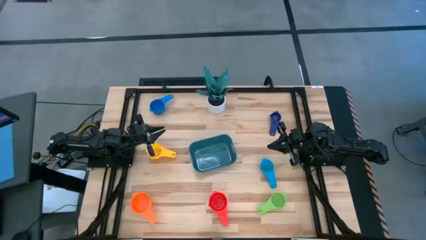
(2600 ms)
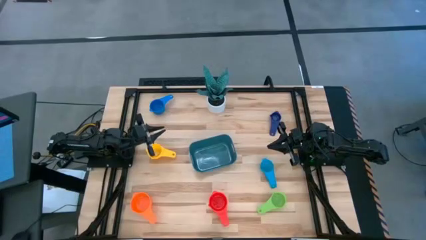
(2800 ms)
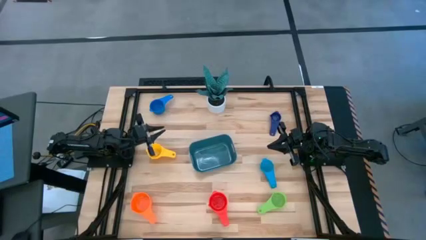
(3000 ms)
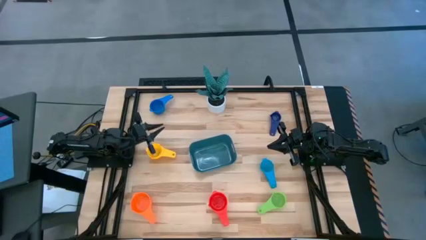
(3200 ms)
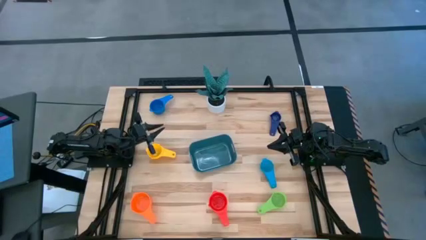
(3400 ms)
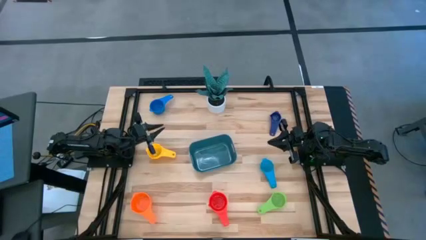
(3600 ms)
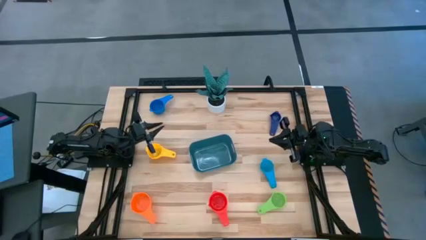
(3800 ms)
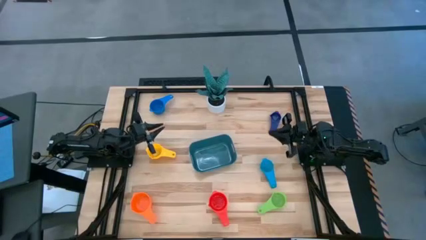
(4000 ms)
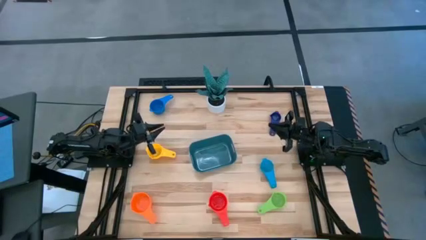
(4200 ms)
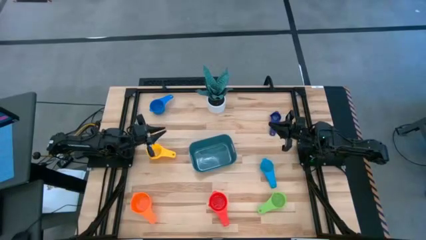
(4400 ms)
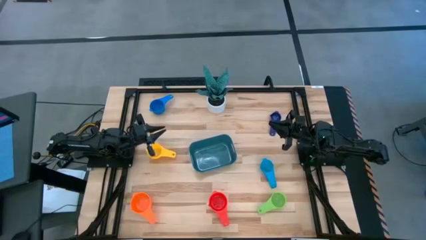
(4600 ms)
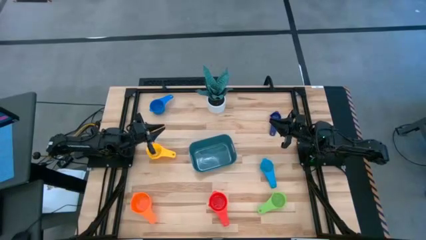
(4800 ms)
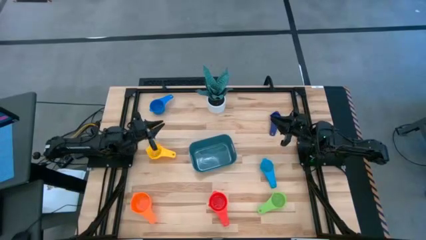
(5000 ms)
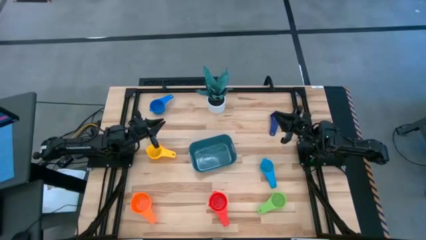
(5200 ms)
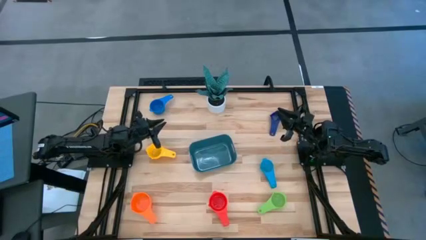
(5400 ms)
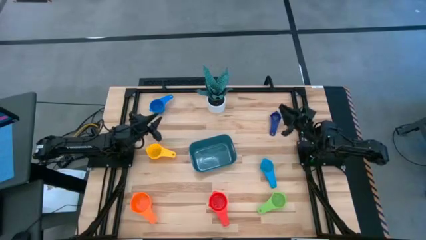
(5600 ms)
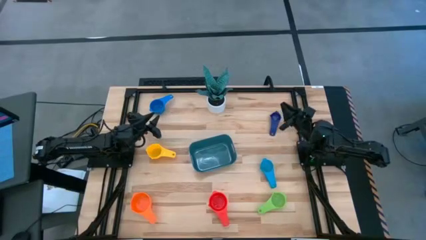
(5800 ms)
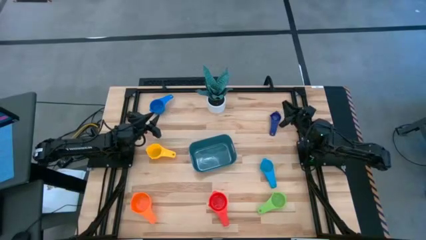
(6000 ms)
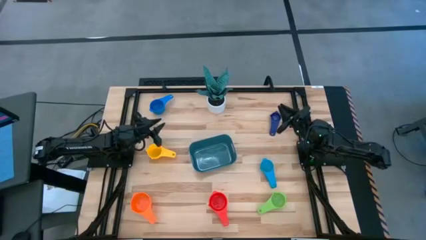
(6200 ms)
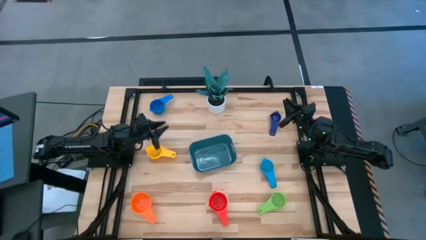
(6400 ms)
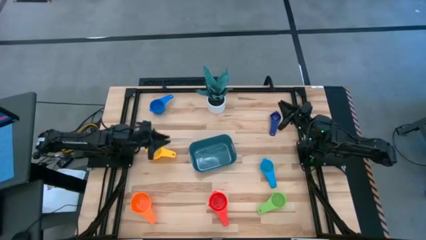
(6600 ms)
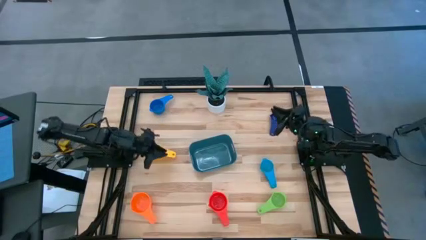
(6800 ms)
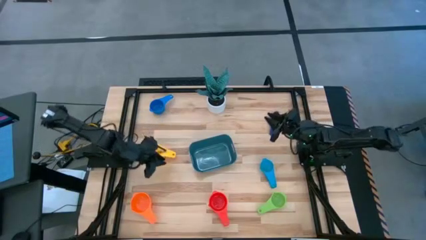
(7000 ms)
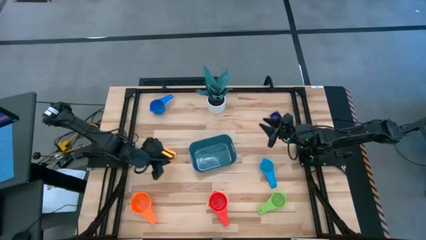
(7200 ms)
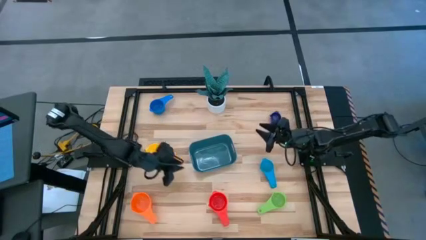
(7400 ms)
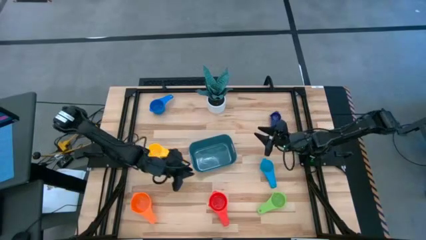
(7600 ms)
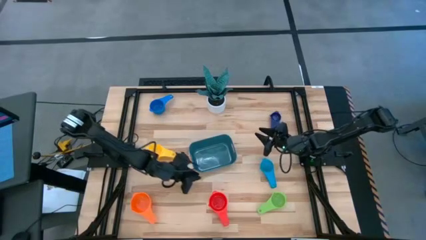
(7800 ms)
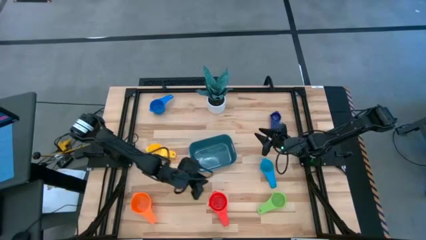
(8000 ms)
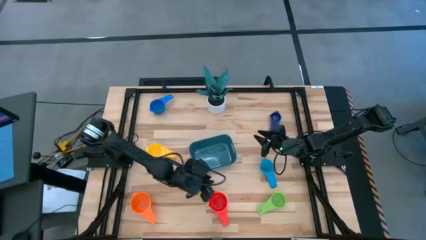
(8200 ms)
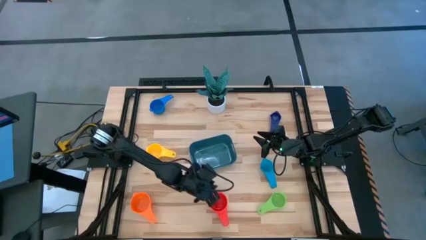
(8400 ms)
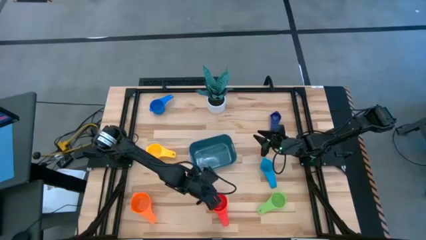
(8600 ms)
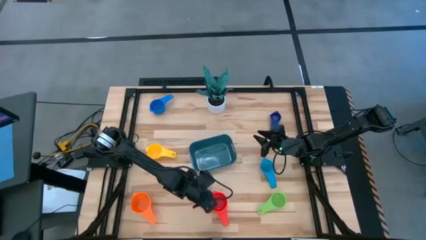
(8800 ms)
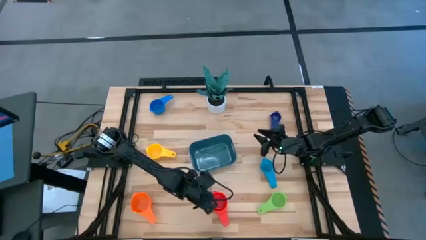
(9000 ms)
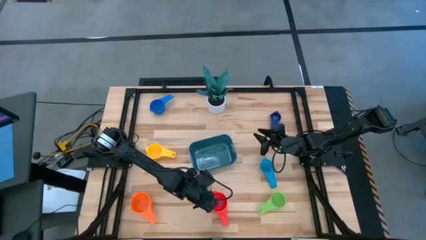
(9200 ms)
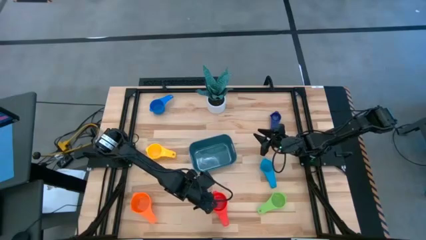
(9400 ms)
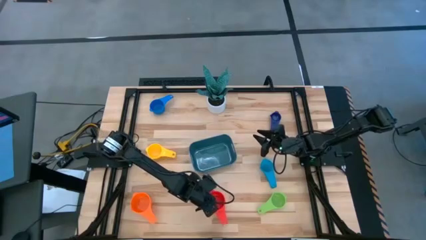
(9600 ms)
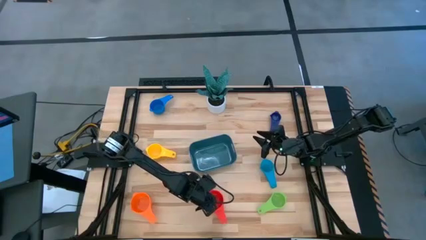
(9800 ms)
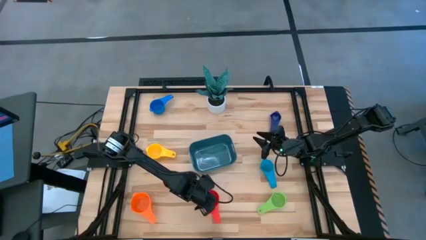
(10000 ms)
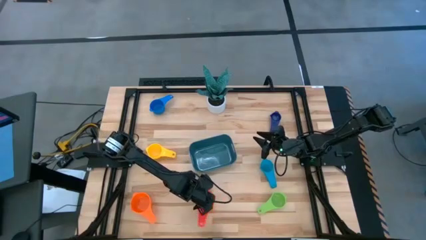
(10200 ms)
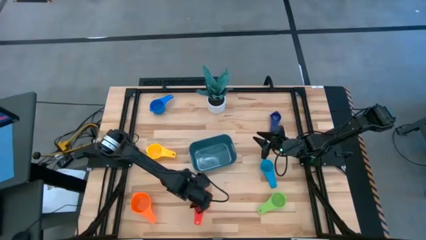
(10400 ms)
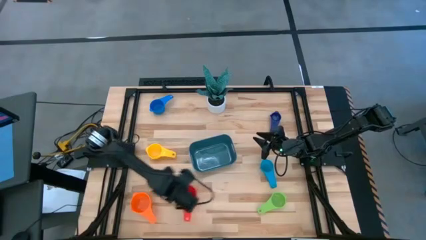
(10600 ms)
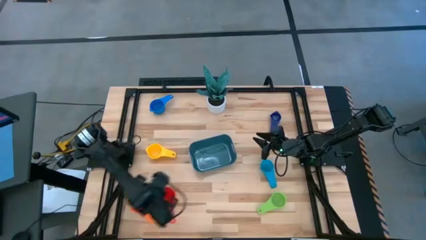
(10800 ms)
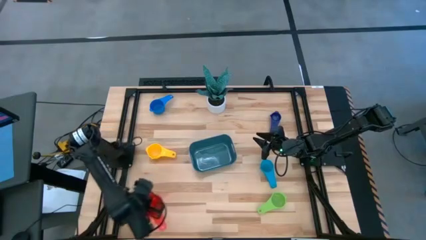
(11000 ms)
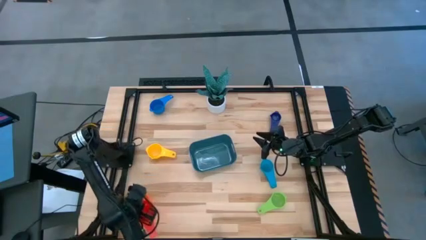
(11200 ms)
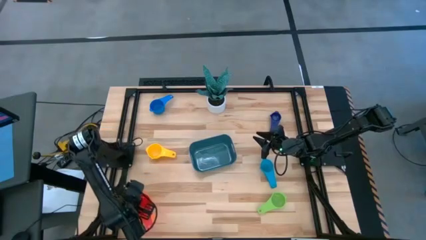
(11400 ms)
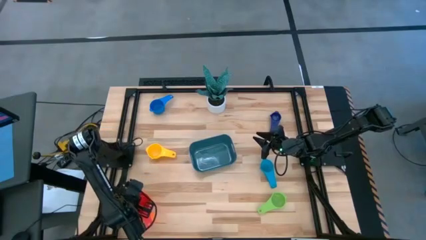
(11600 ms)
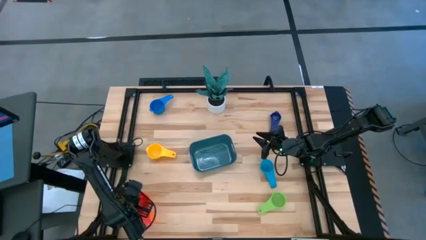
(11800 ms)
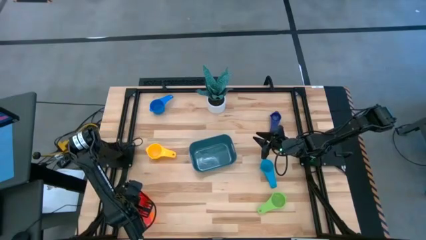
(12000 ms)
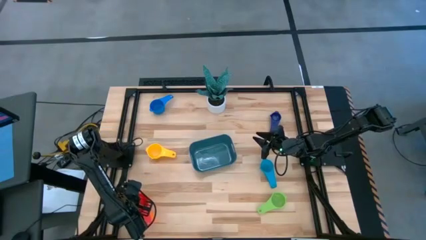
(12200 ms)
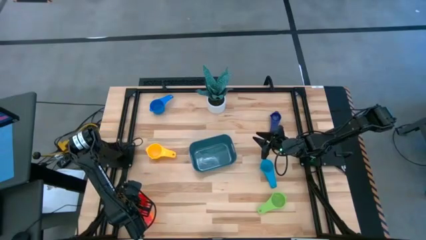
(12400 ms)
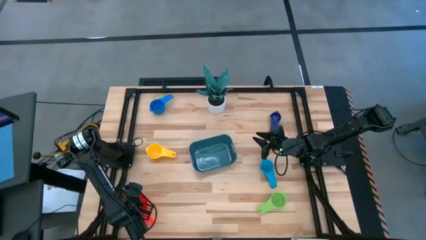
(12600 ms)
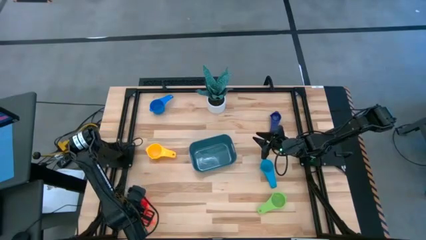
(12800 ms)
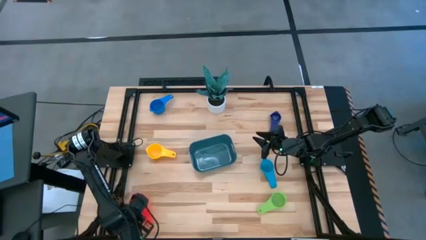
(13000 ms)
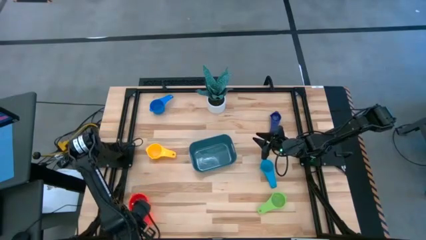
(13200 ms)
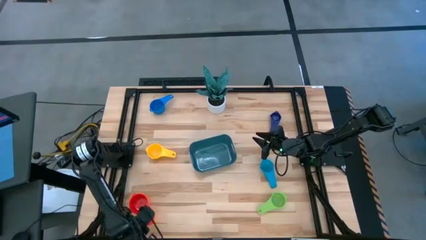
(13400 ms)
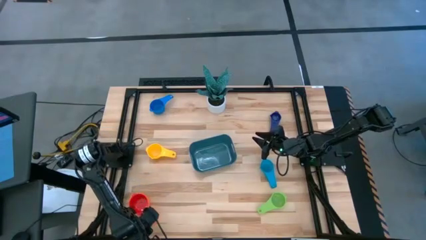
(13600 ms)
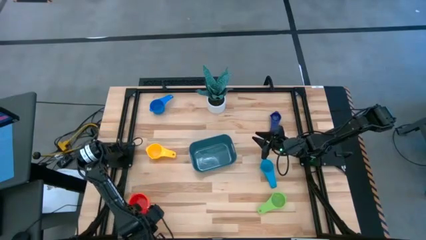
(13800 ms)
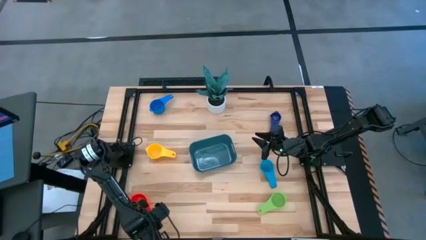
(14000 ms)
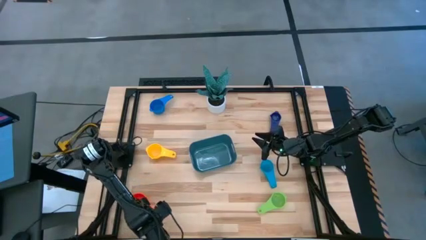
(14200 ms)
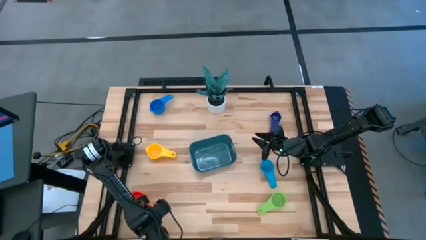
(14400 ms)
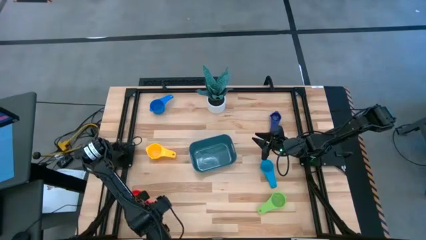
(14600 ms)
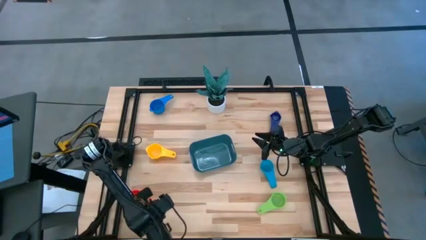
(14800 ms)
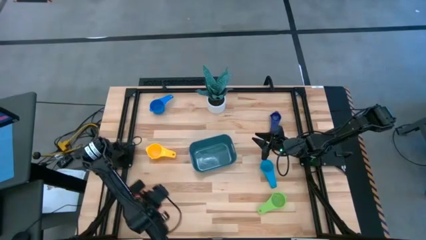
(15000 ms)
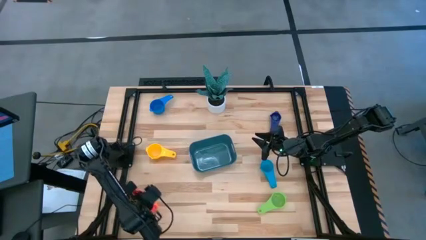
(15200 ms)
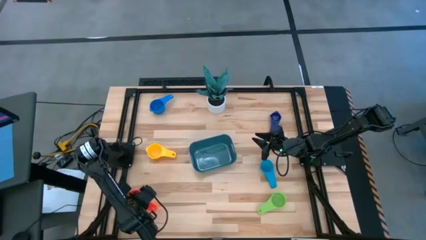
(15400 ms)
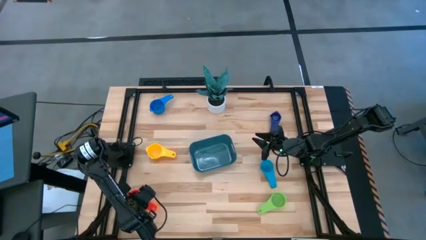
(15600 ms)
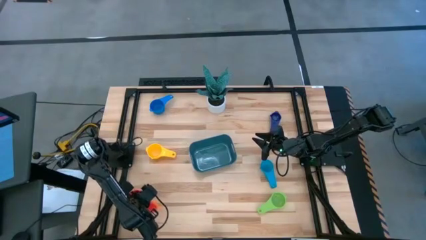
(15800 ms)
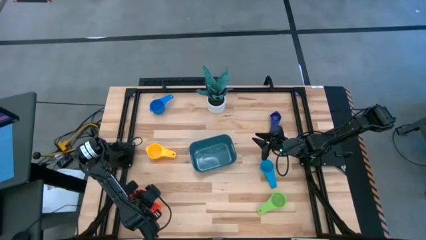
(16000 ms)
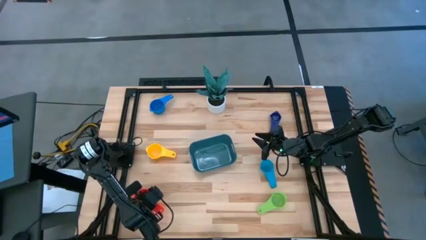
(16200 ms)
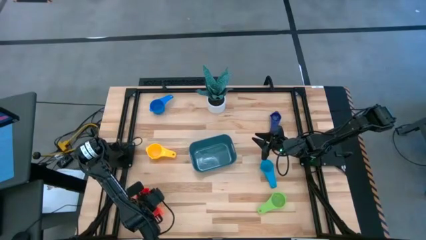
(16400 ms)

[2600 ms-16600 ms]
Task: Nest measuring cups in basket
Stack the red measuring cup on top of the orange measuring cup

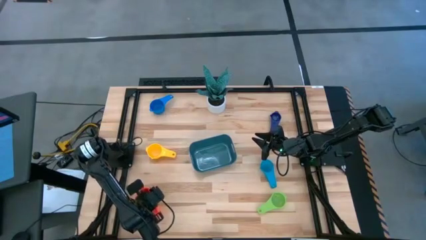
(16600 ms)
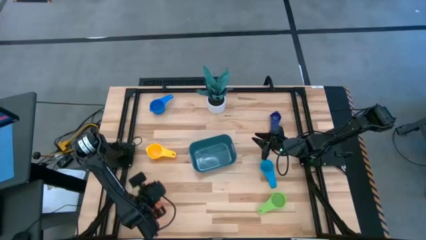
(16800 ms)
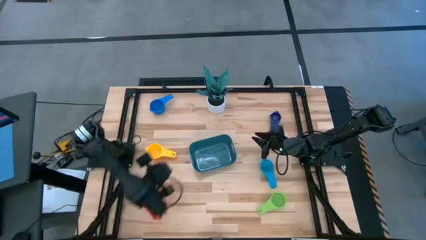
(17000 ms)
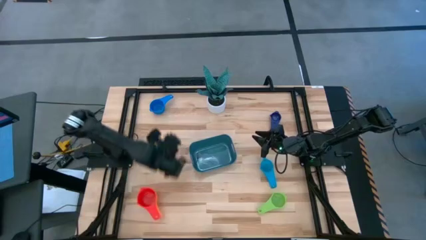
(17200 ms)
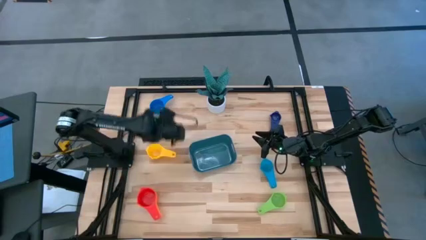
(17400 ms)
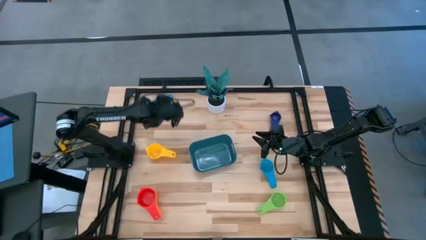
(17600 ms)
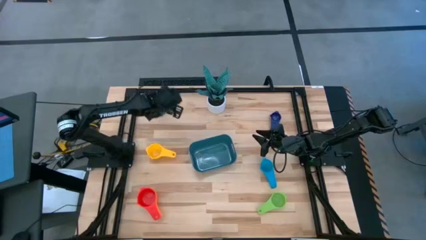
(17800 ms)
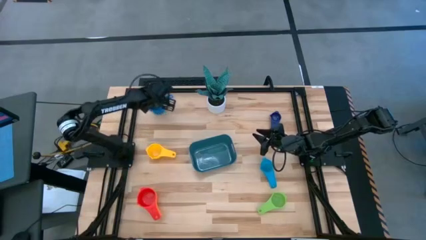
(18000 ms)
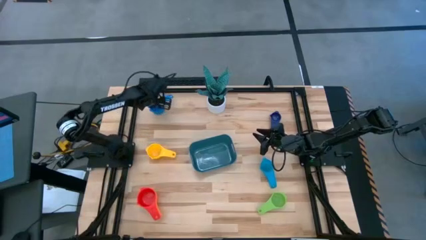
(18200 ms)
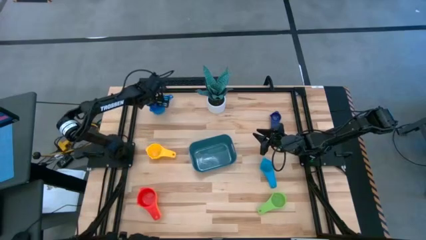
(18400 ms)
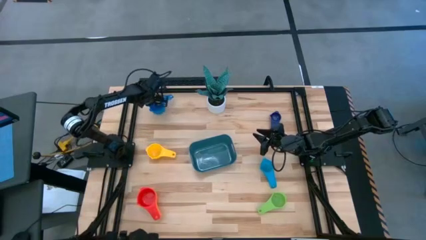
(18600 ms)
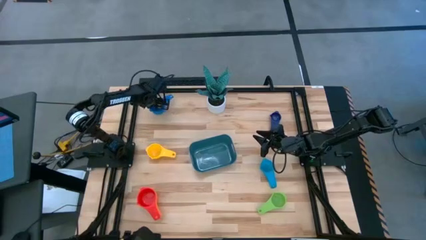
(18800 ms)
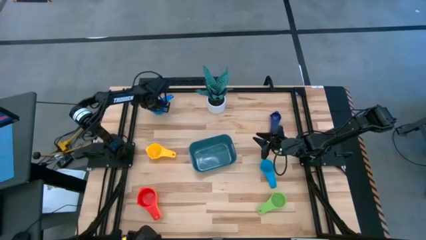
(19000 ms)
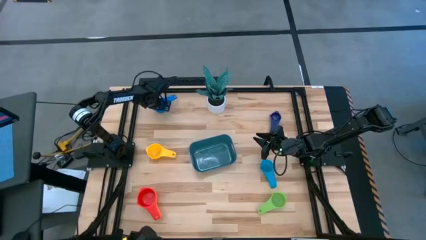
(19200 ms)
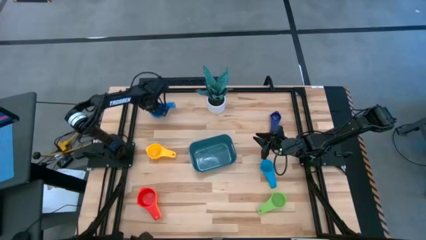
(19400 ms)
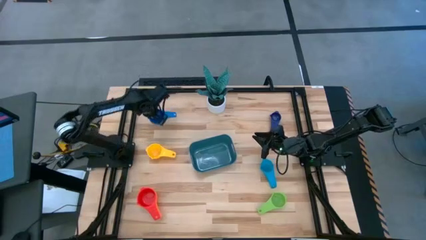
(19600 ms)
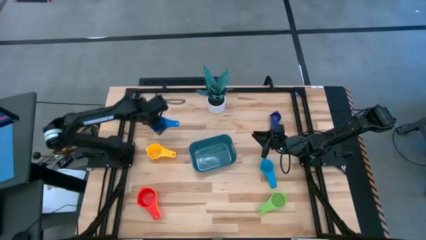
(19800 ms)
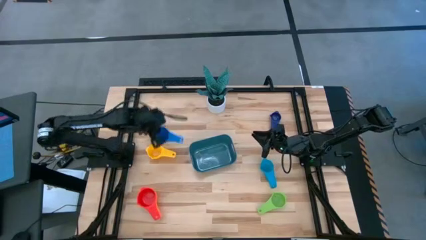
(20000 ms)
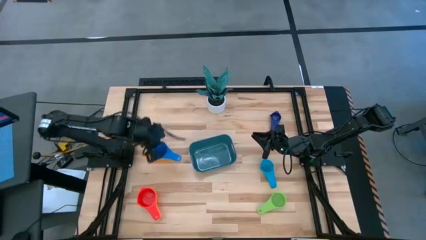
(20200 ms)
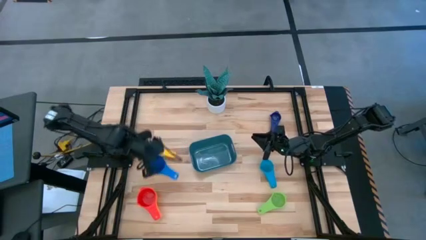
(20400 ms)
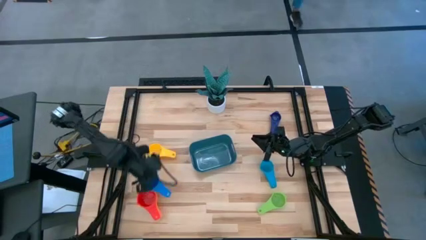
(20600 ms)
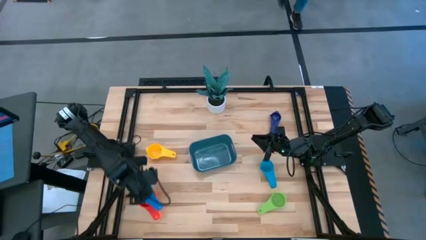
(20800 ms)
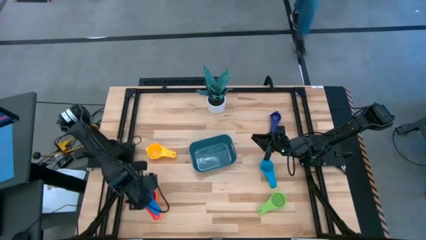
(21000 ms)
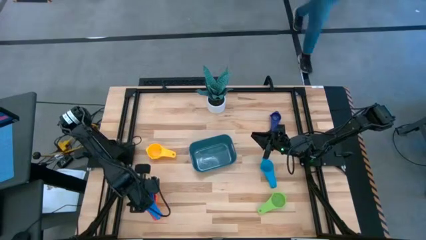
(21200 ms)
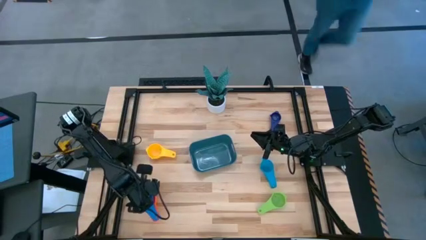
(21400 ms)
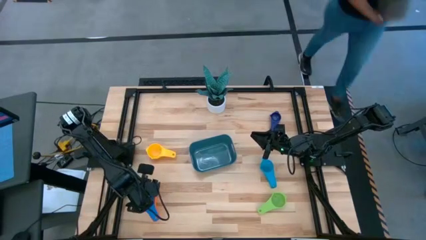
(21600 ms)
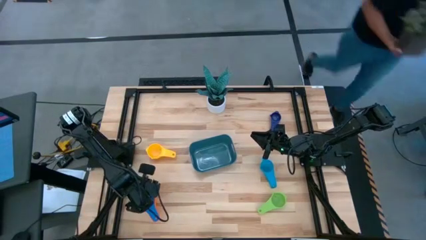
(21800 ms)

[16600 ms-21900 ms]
Stack the blue measuring cup on top of the red measuring cup
